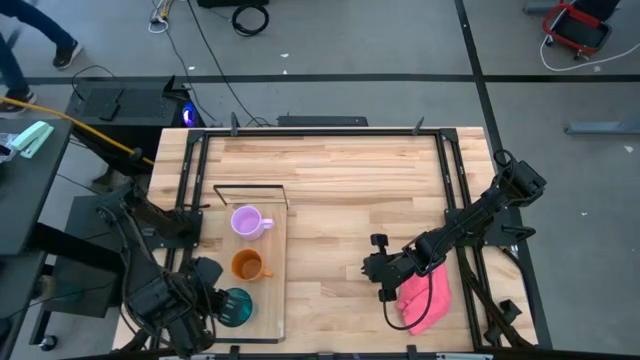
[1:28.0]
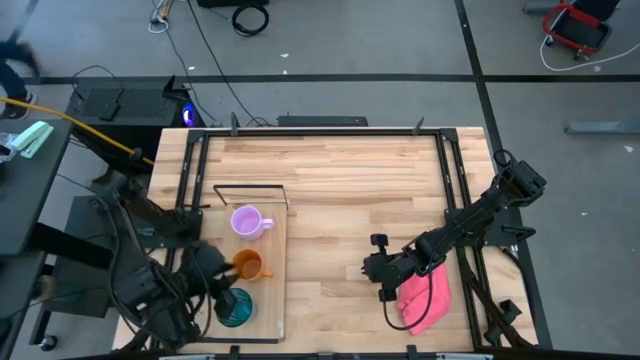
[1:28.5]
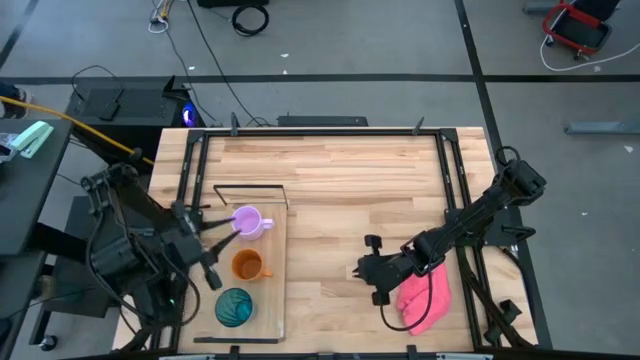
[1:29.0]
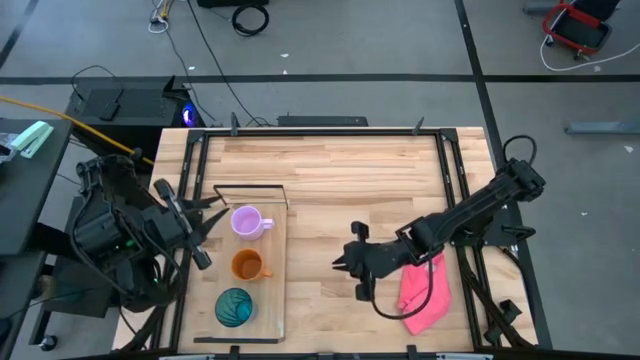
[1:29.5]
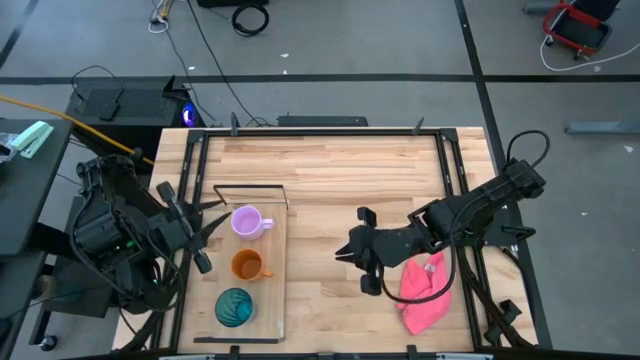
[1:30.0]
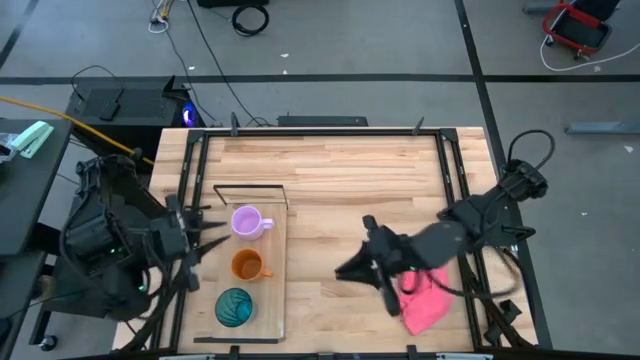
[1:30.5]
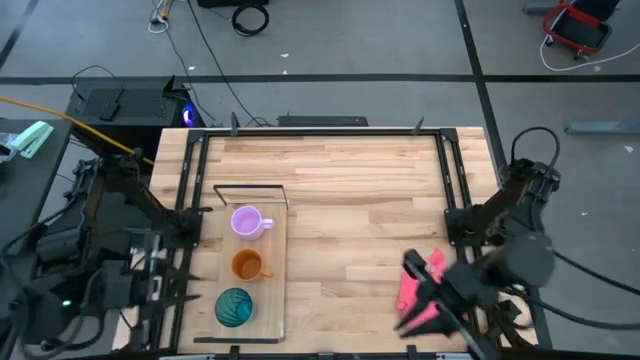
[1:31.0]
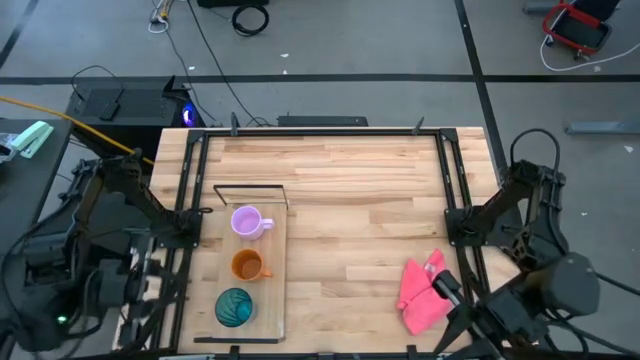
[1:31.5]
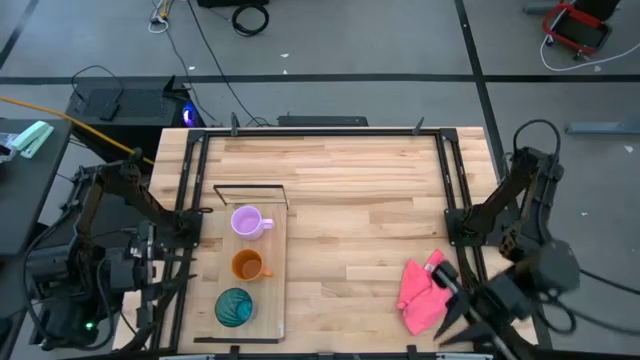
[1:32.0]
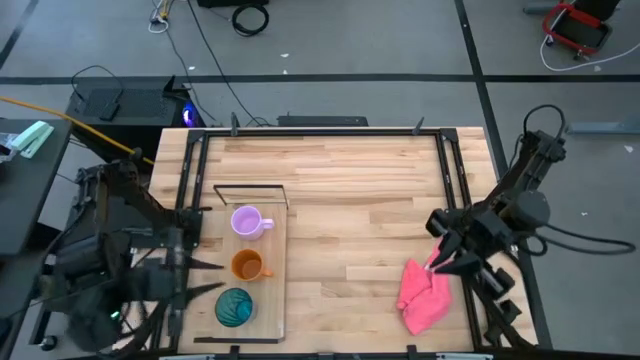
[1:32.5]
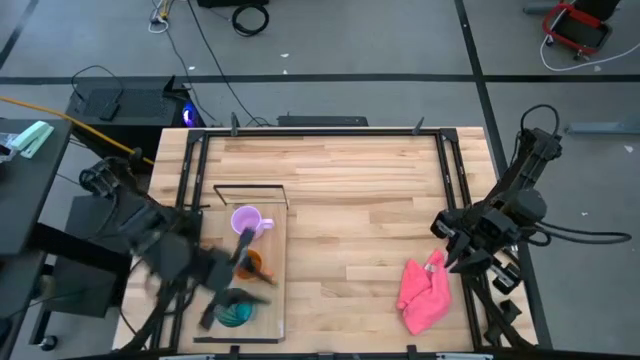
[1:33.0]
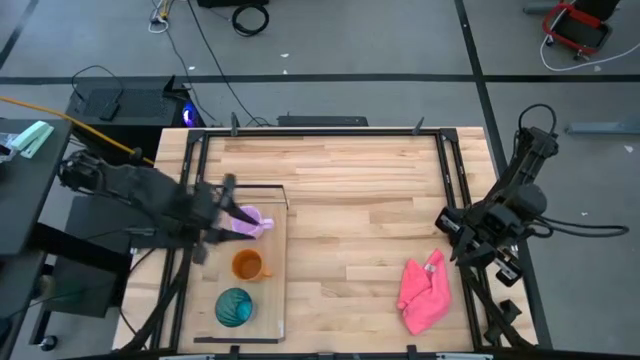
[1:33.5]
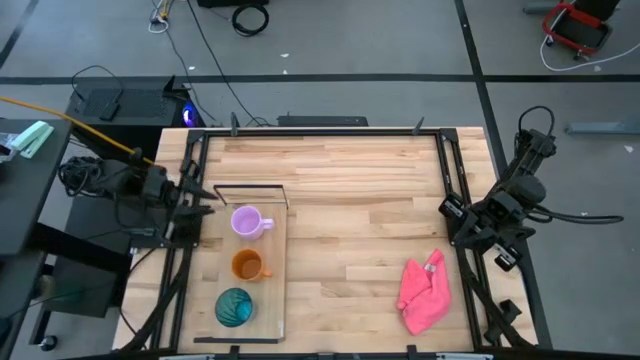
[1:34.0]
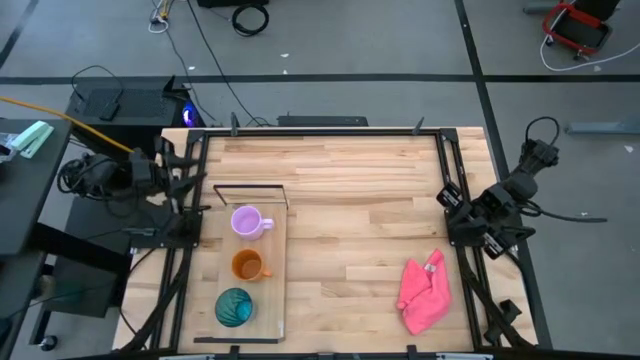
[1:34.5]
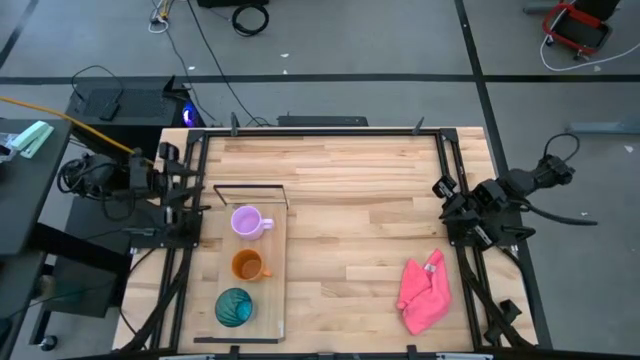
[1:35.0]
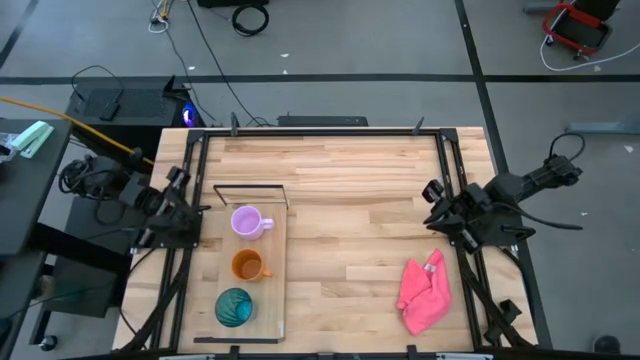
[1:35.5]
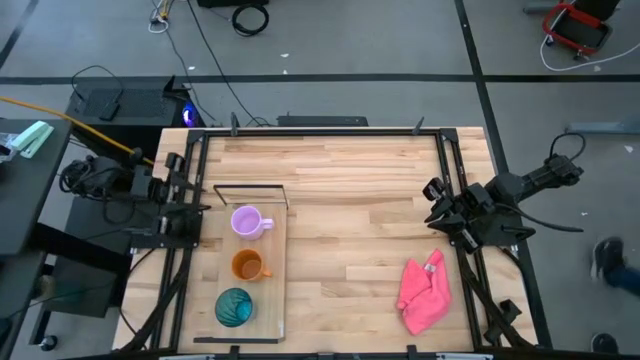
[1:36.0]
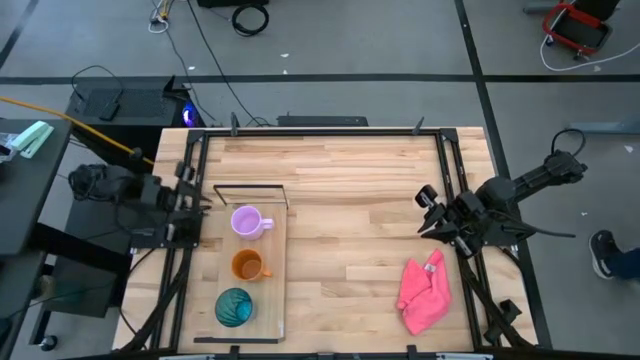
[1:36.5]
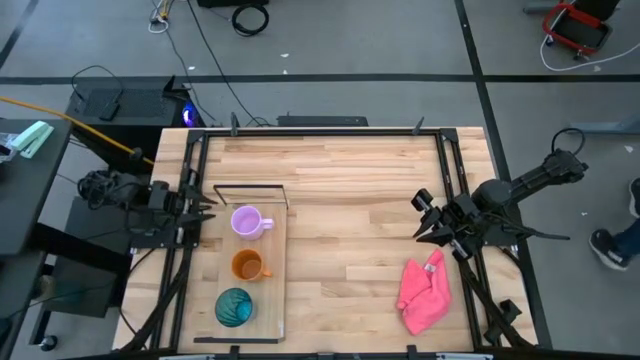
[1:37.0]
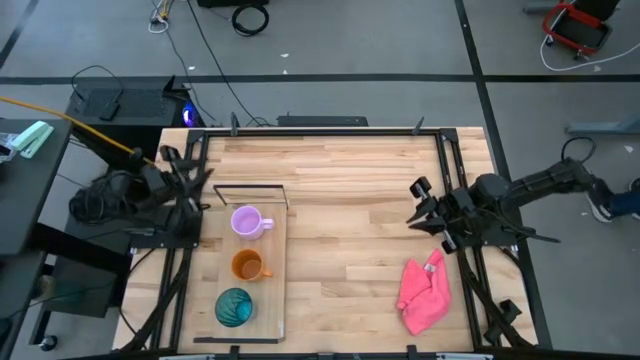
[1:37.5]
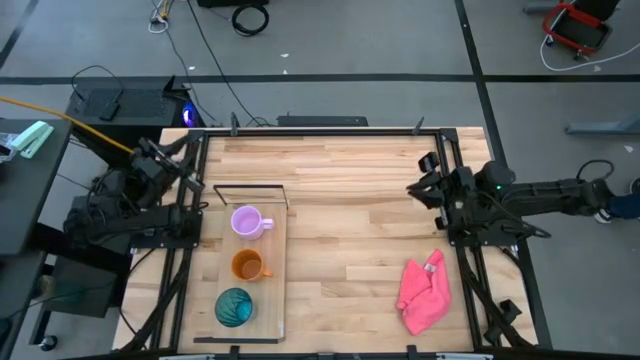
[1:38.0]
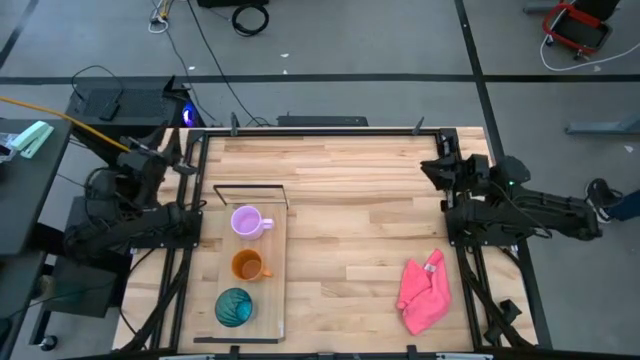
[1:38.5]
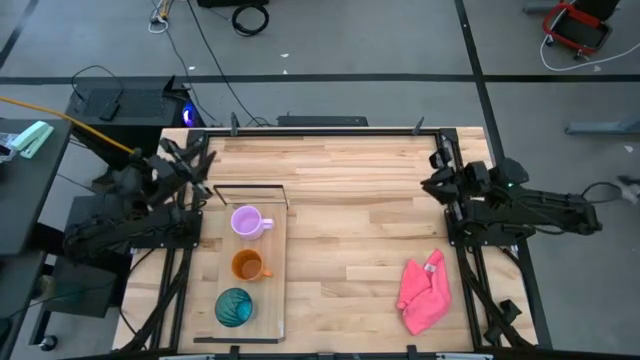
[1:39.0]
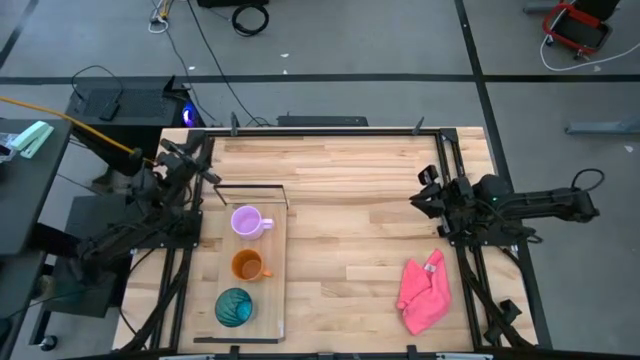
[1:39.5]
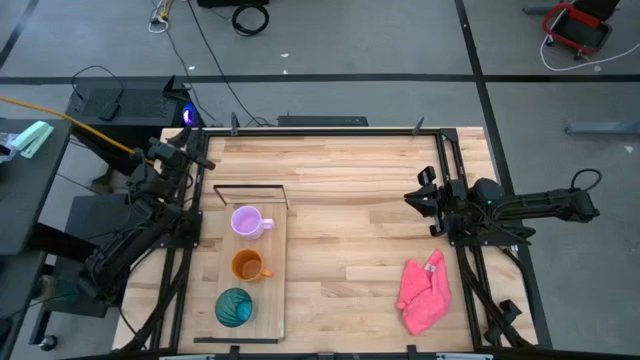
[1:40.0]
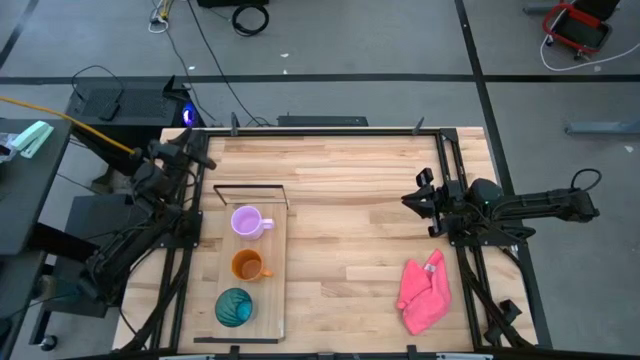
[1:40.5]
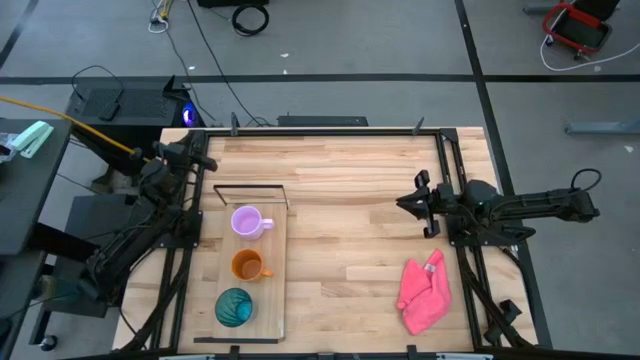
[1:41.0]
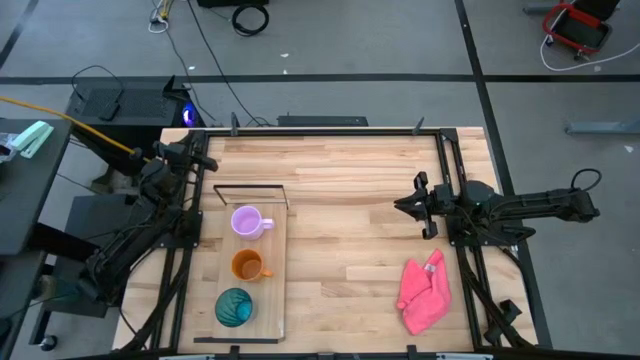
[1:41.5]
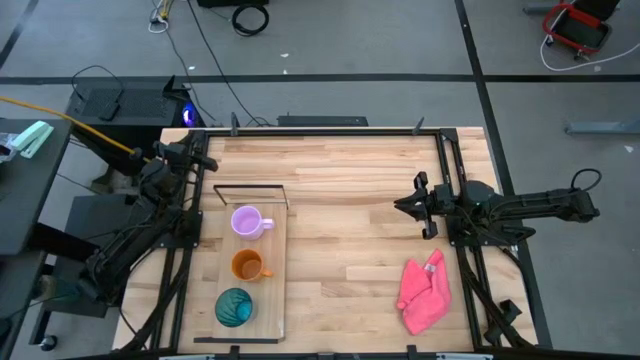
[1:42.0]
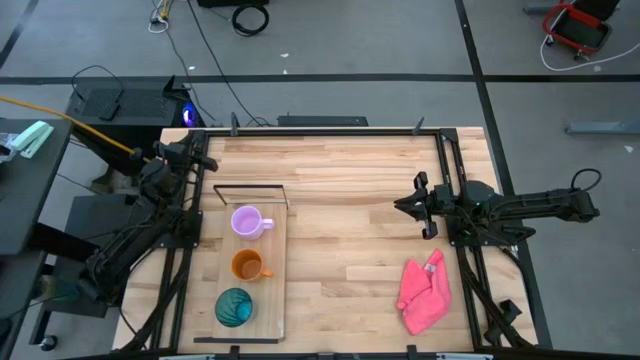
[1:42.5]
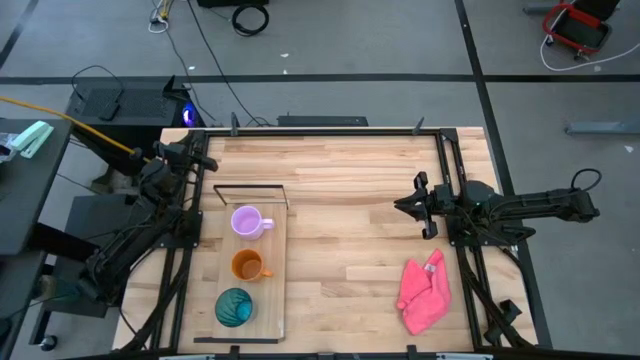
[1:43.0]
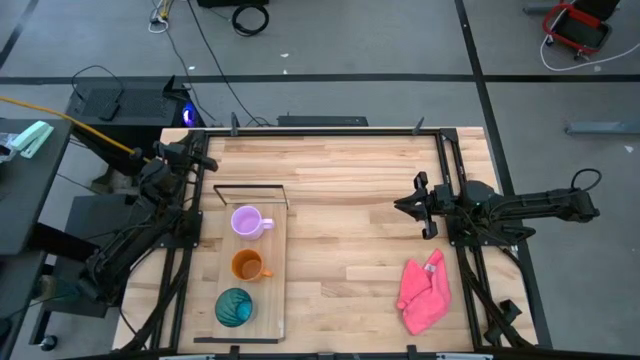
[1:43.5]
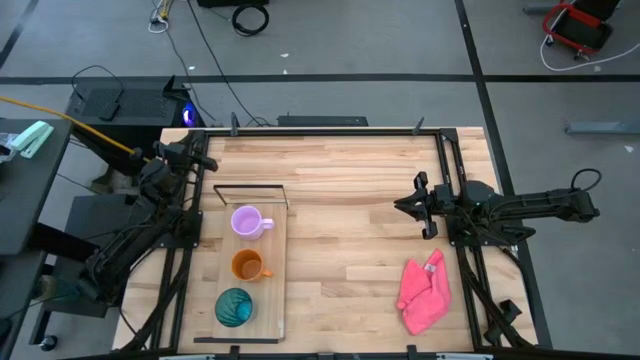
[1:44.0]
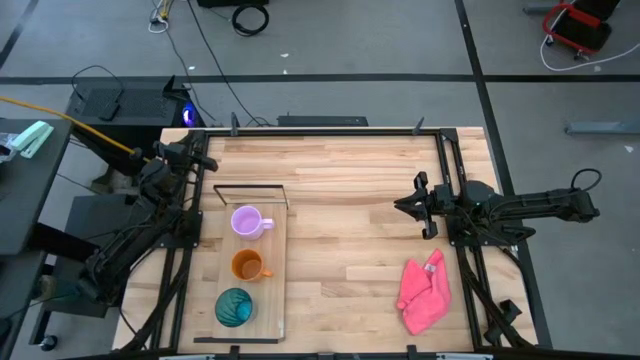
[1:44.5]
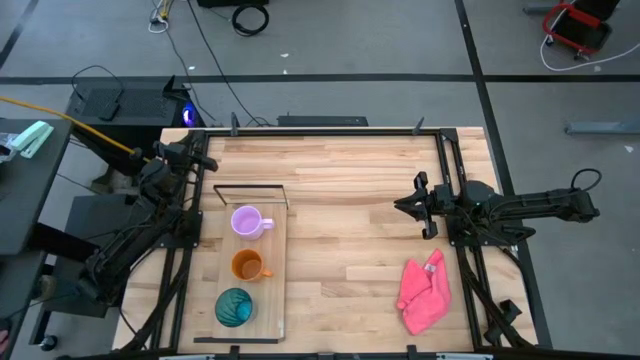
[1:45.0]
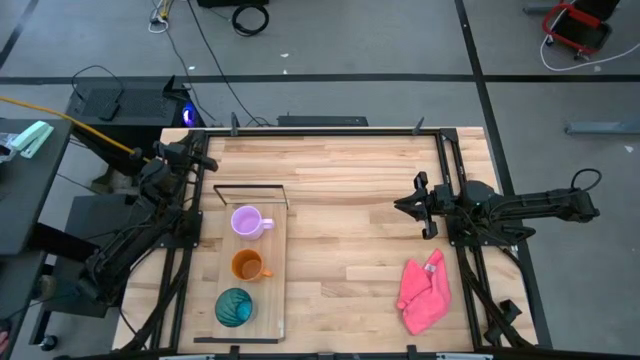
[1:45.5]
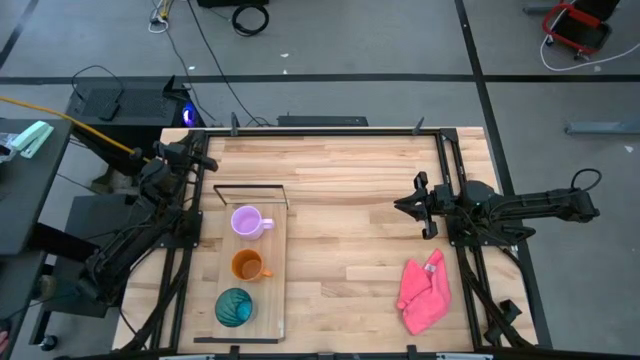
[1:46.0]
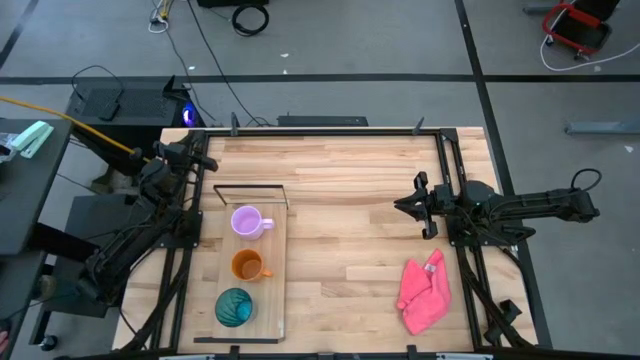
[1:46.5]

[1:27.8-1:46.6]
Task: Stack small to large cups/mugs on shelf
Return to Home Position

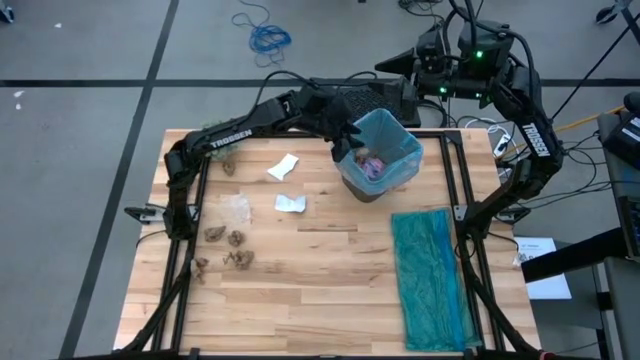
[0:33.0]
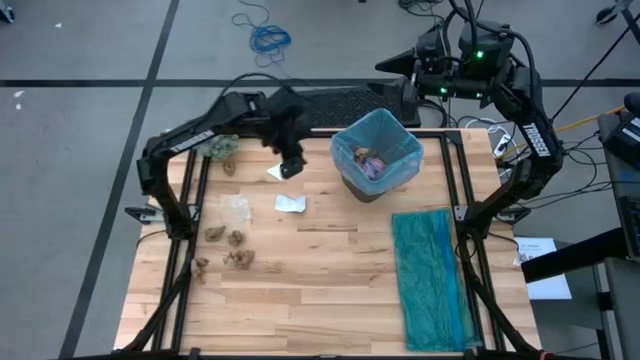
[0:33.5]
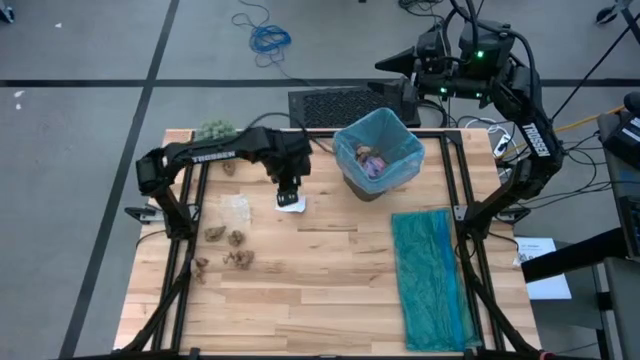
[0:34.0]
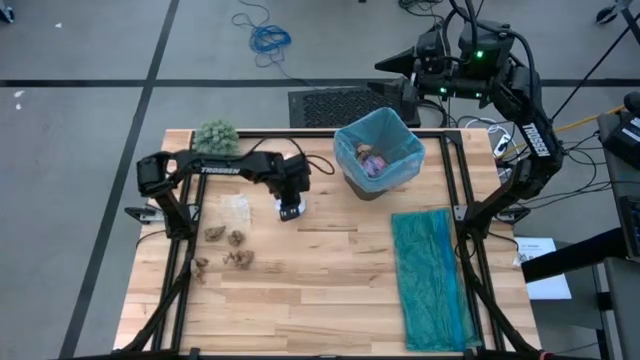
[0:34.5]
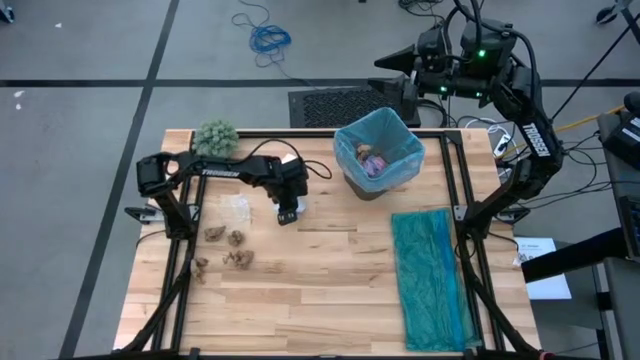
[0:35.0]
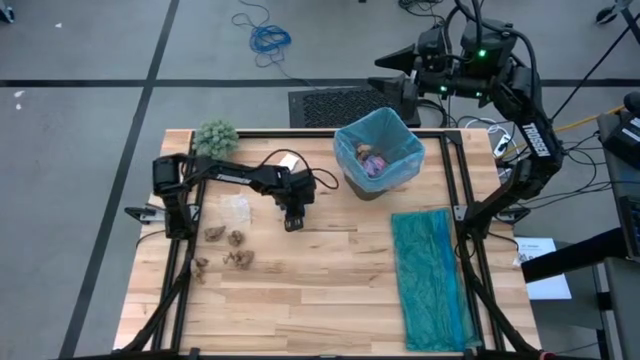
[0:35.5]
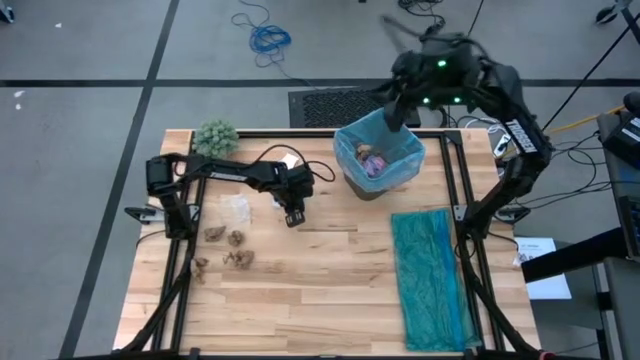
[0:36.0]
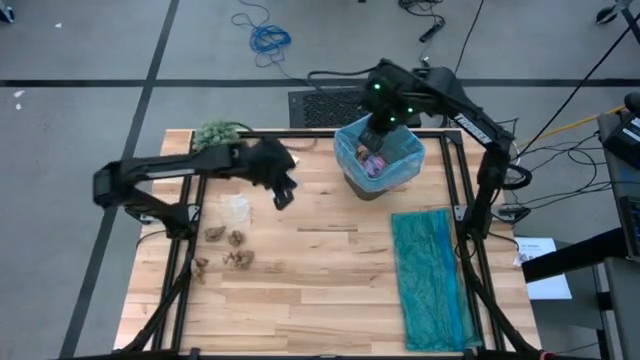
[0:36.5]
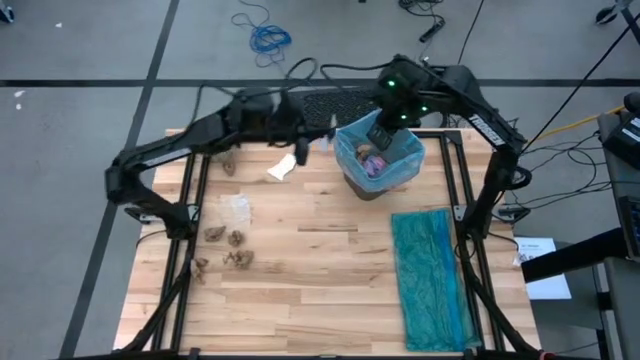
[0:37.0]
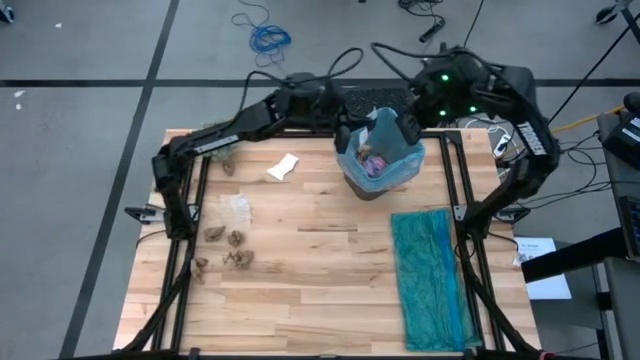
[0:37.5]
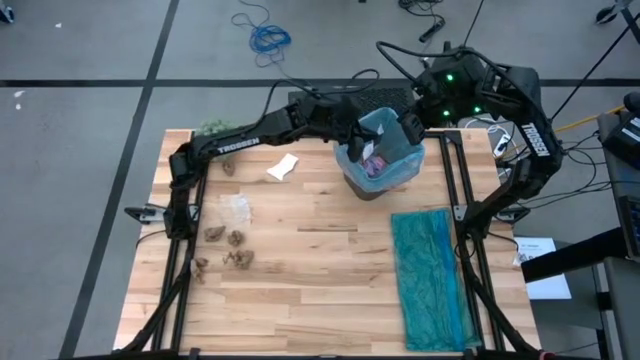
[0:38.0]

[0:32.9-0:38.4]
Task: place trash/remove bag and relplace
Put the white paper into the trash bin
